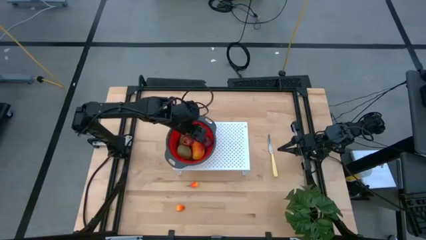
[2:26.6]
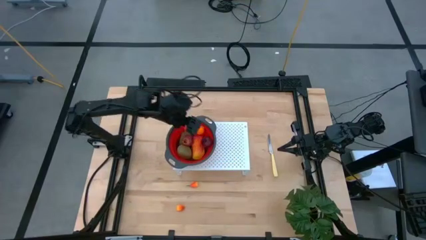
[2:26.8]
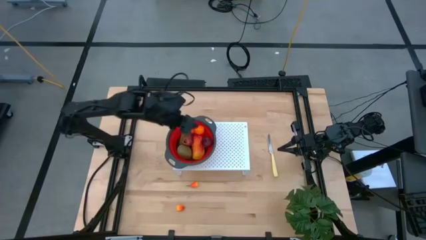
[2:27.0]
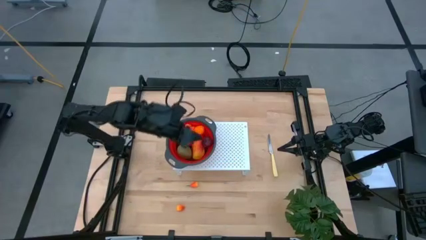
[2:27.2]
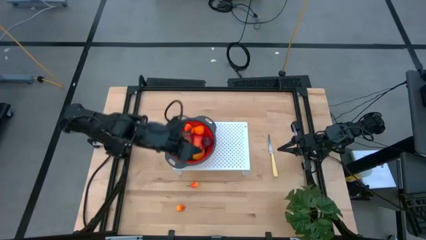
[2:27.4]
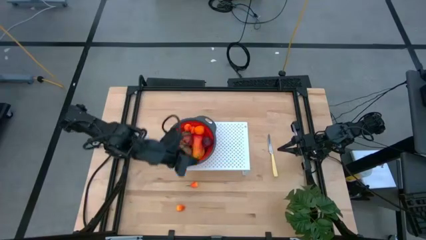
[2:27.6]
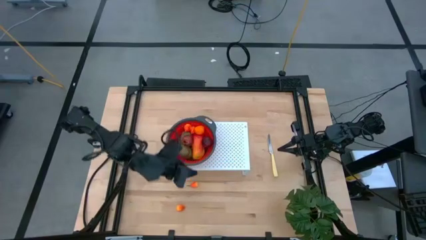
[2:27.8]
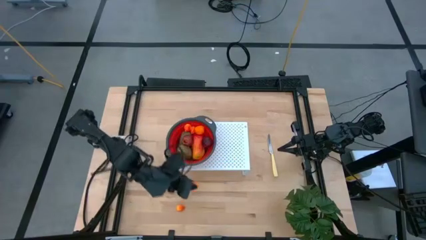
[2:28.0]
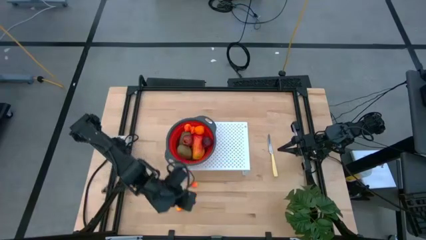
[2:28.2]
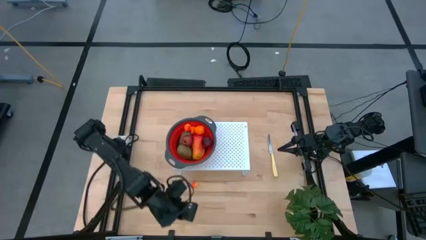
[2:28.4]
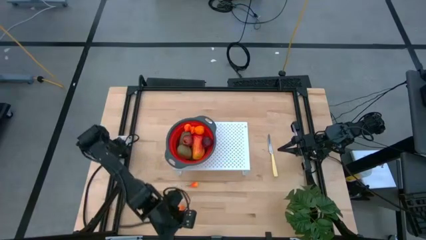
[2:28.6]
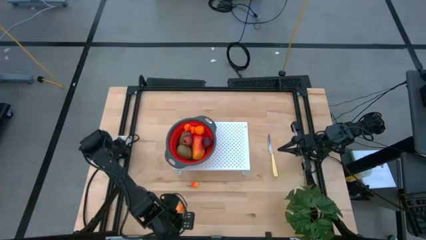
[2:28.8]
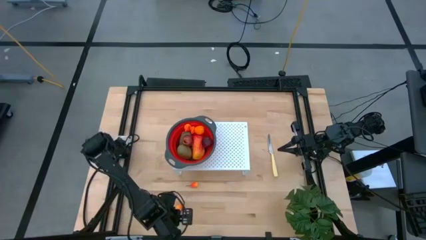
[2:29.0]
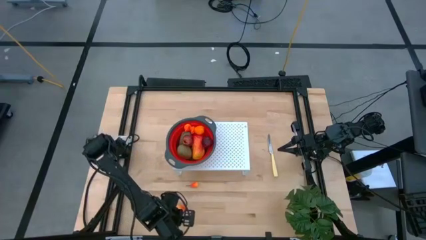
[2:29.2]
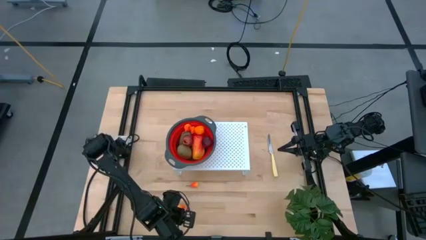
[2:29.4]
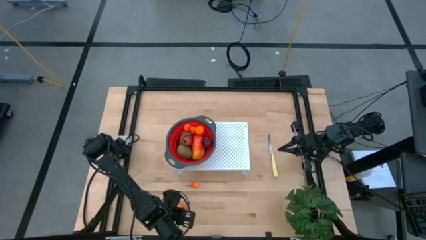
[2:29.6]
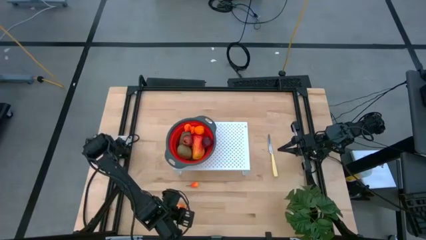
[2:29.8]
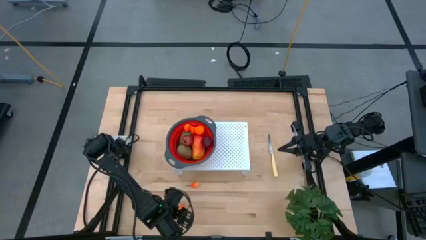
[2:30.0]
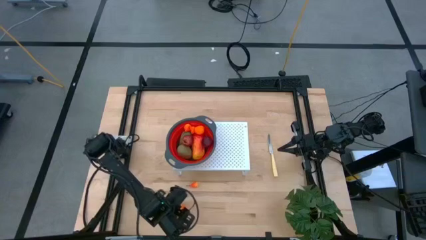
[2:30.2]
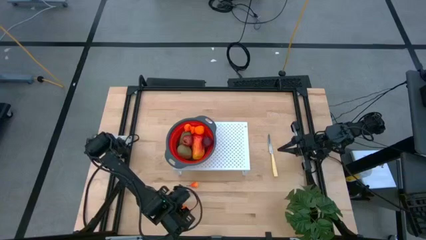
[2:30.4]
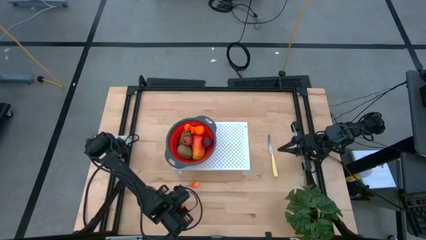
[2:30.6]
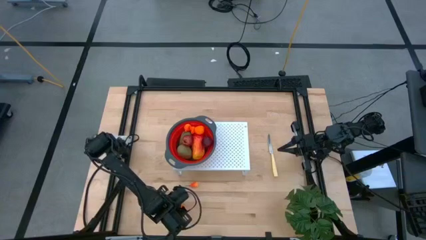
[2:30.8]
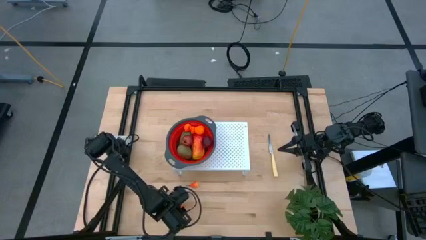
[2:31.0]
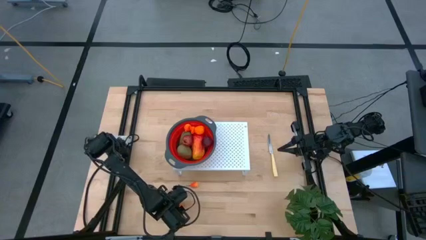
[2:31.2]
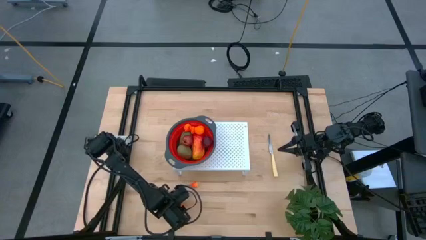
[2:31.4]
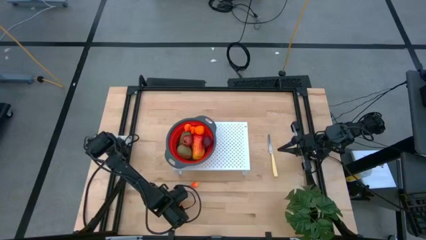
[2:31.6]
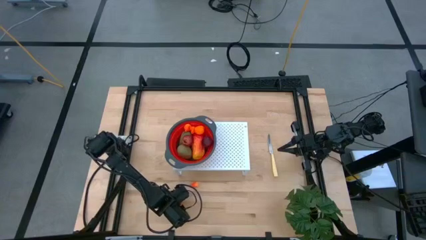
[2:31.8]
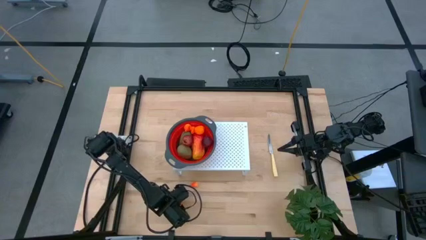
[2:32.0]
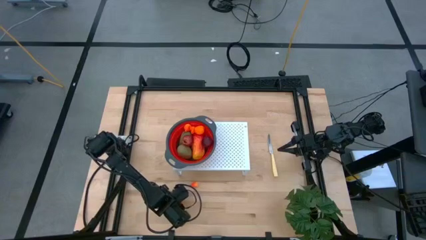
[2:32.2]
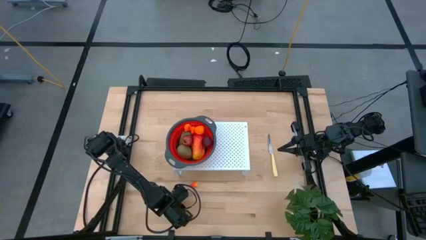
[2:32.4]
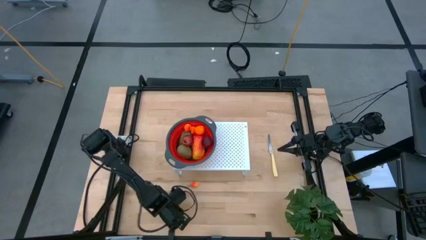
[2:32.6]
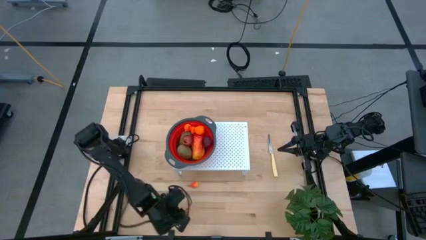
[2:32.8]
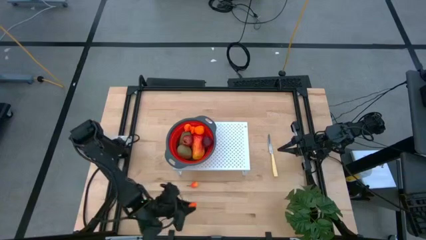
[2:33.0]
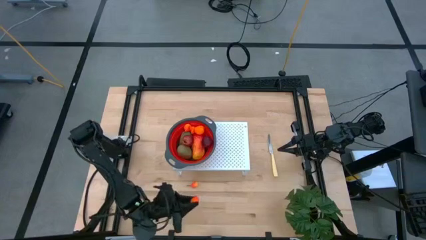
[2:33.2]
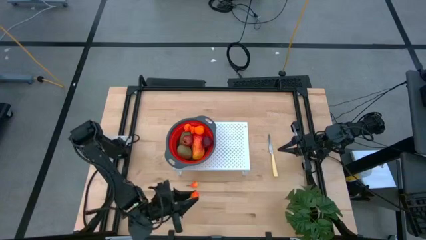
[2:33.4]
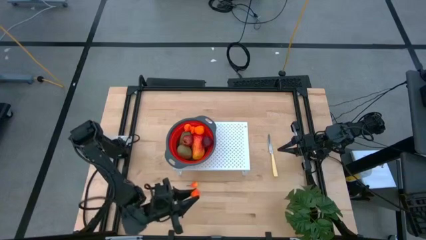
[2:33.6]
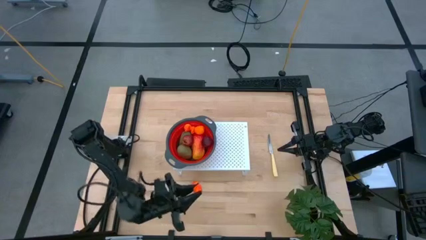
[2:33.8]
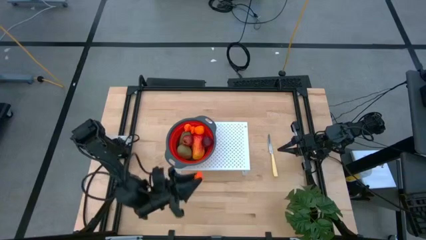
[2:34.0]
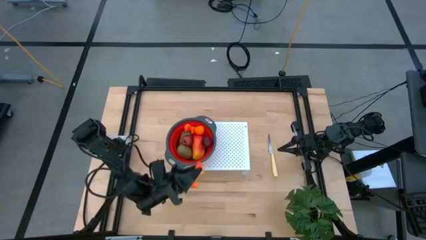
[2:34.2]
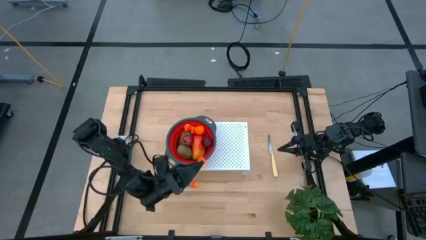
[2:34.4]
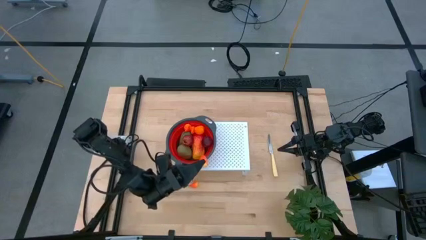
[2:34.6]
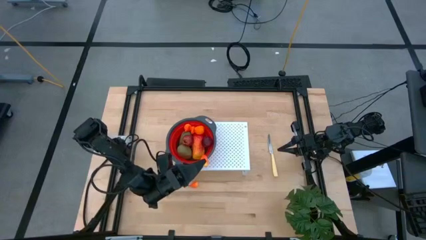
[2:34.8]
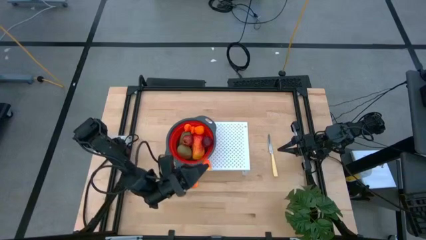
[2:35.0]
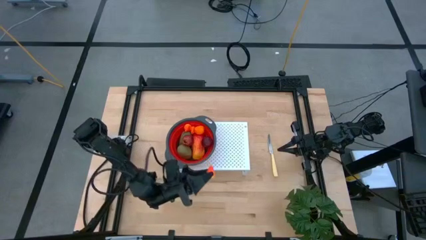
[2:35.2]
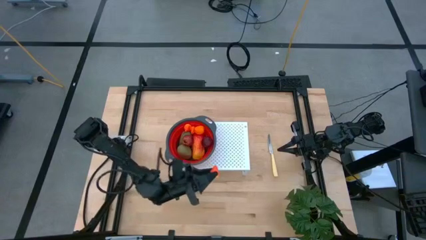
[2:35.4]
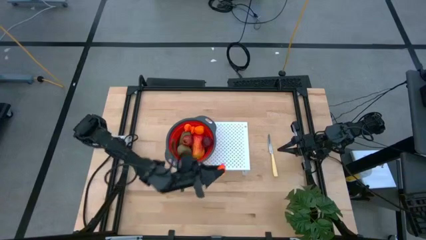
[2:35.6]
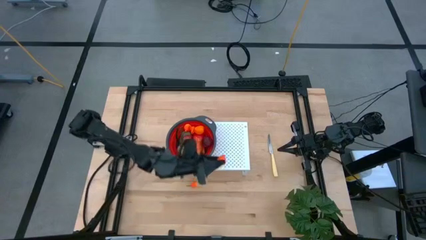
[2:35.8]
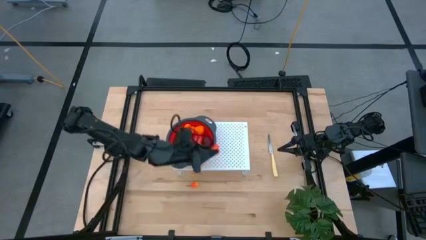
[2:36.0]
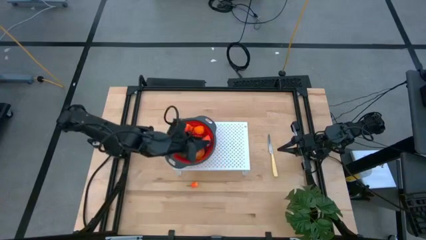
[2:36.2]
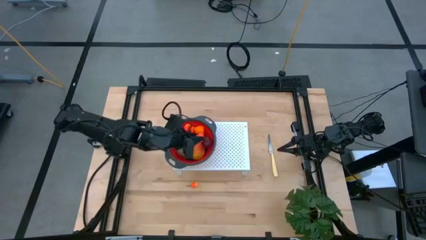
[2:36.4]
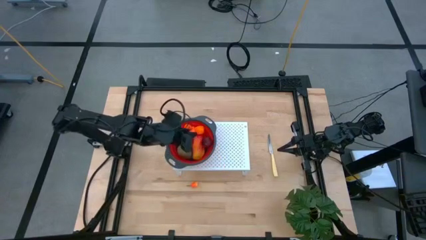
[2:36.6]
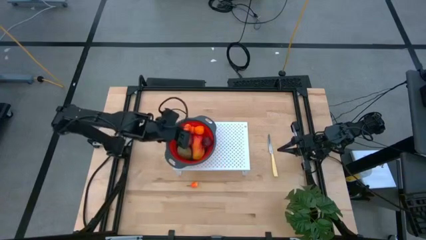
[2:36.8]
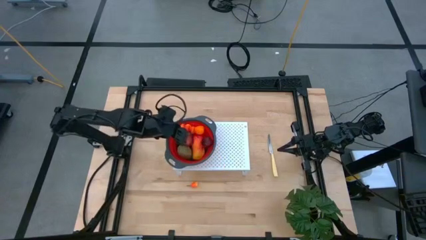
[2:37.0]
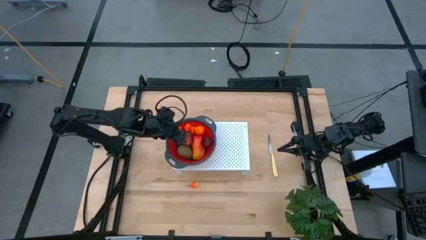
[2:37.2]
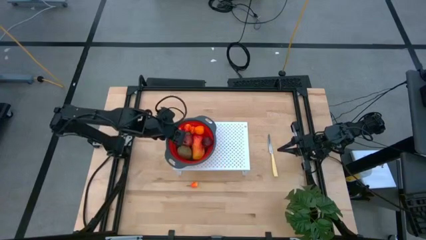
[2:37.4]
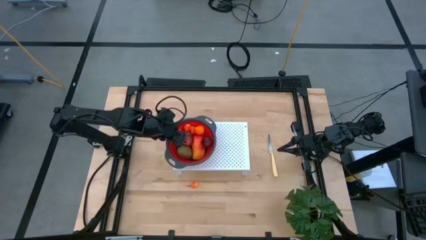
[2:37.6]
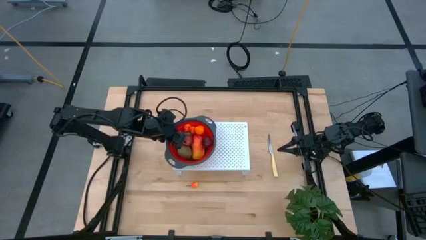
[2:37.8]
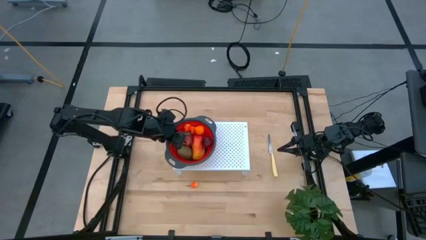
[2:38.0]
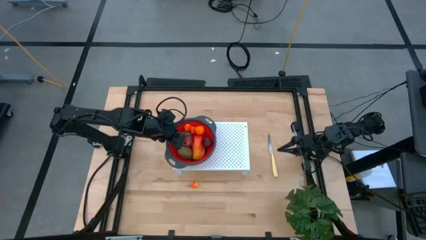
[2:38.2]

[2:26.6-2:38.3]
Task: Pick & Place Fruit
Put the orange pear into the red strainer bowl on the shelf
